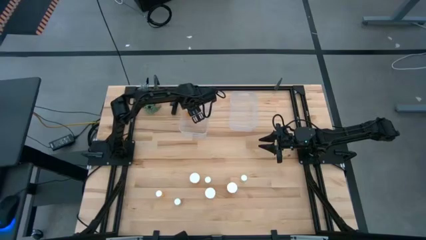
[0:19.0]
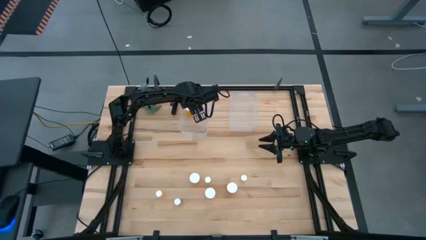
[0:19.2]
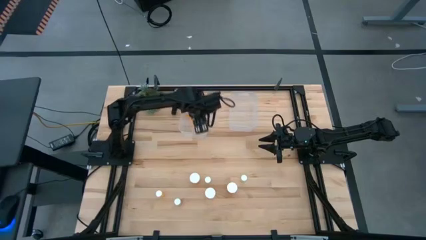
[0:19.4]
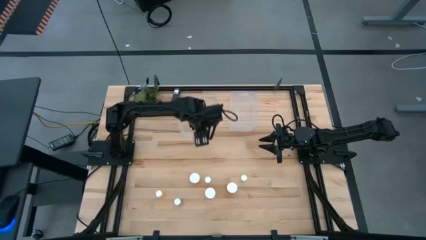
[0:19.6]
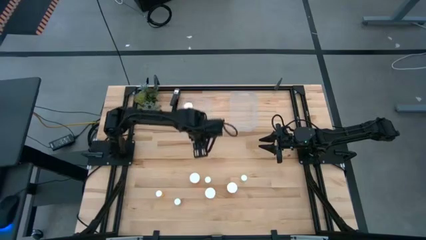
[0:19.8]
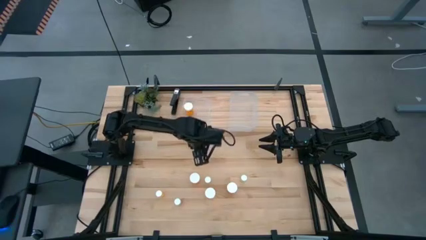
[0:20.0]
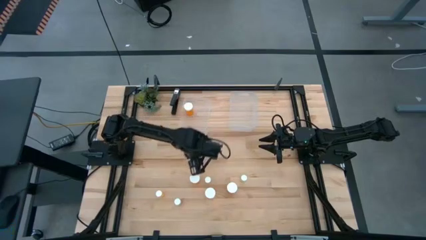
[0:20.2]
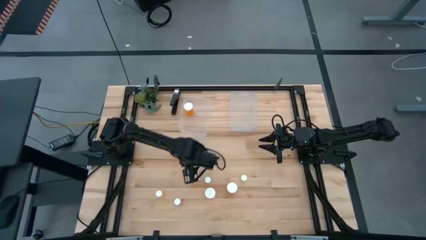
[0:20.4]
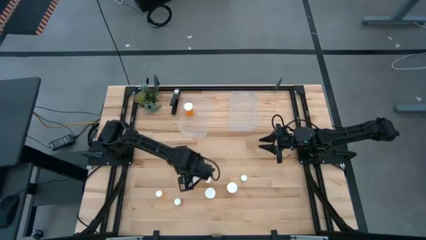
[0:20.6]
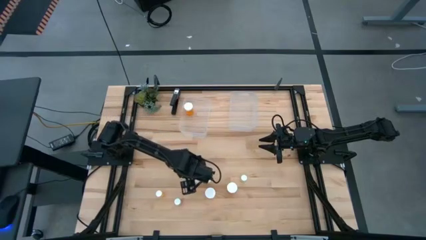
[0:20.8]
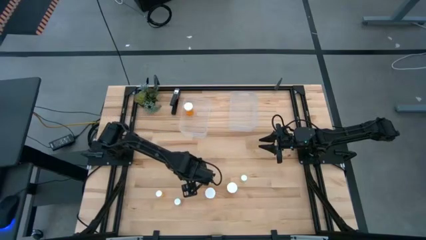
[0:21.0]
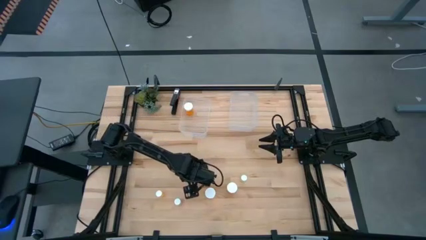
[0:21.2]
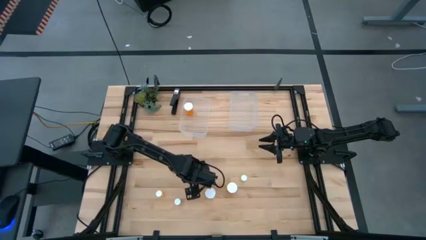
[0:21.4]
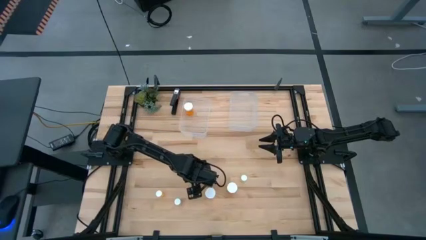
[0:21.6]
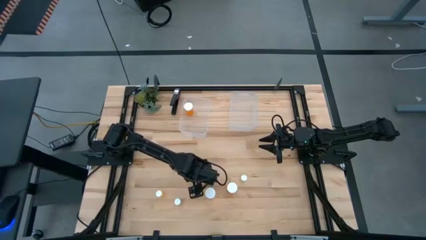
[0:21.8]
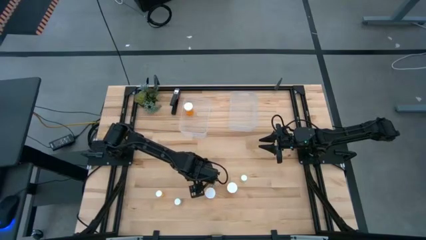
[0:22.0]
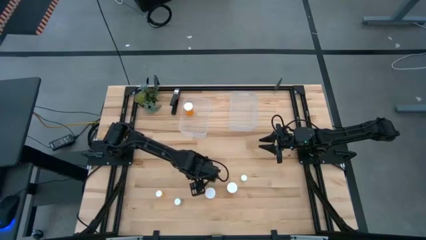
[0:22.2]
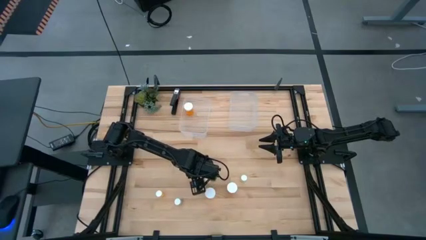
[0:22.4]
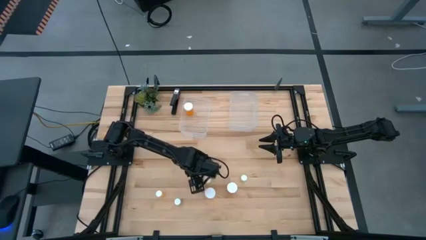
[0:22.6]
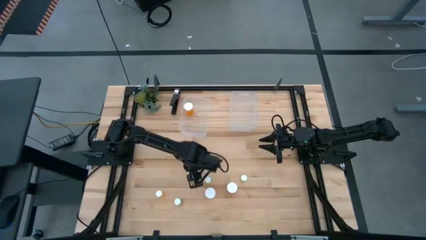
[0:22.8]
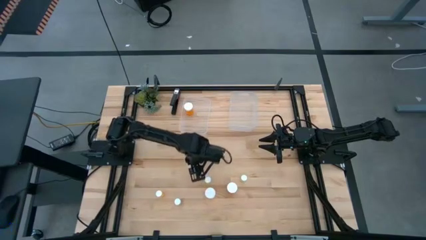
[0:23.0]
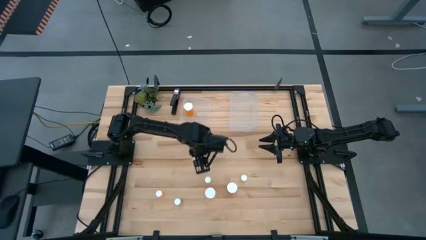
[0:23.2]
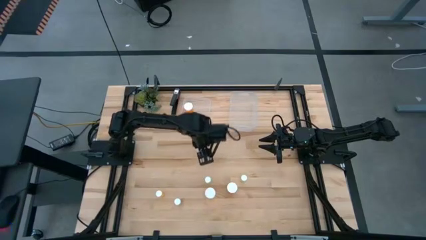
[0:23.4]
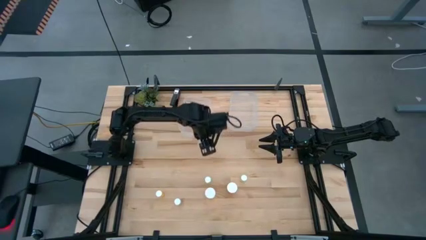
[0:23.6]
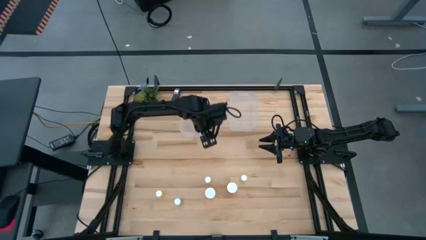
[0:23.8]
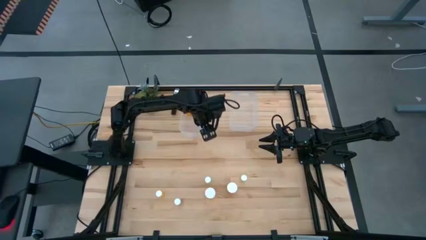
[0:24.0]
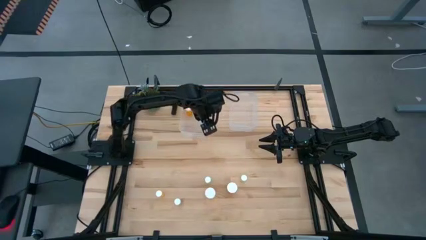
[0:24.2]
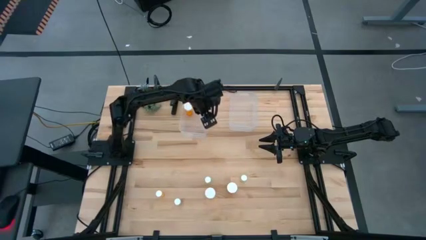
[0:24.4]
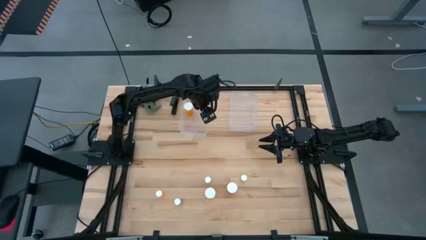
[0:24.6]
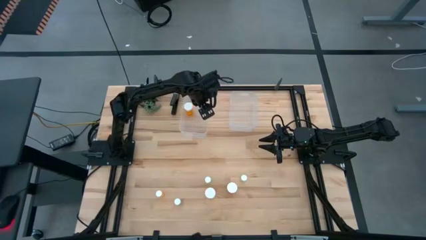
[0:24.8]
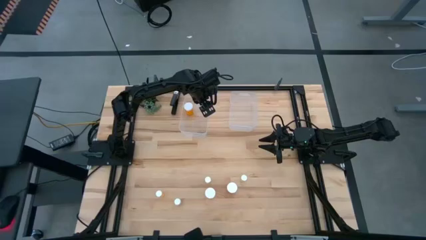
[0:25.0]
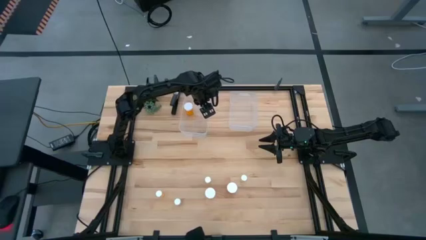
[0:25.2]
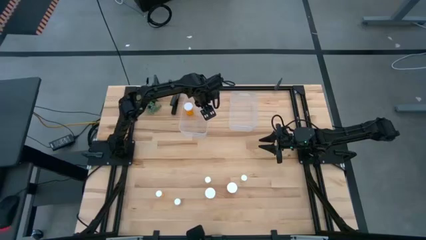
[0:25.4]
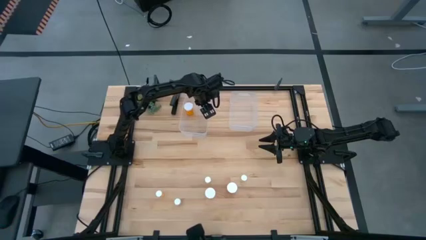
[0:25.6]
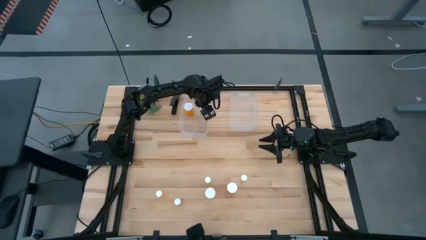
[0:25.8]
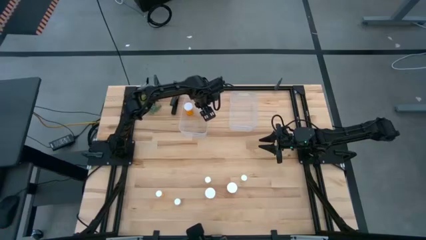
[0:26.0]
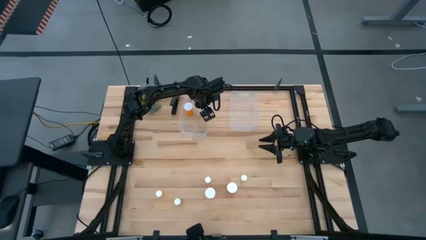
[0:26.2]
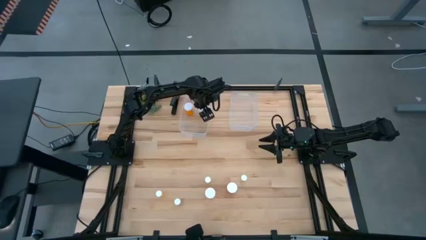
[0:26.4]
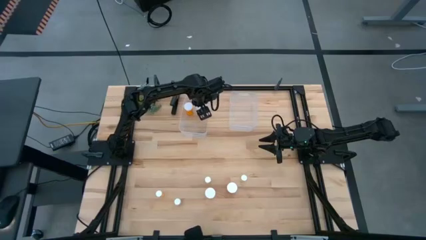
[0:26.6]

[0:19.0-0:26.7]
Task: Pick and place medicine bottles into bin by pill shape (circle, oval)
Put the big orange pill bottle in the left transparent bin
